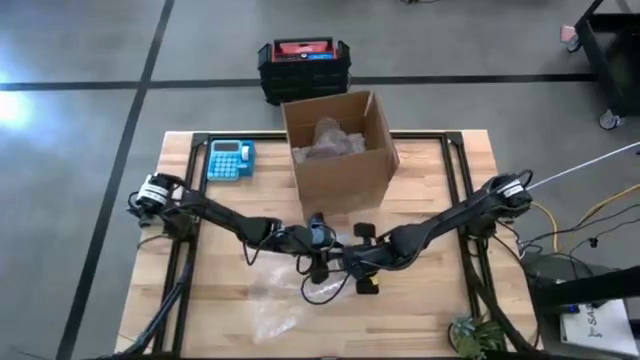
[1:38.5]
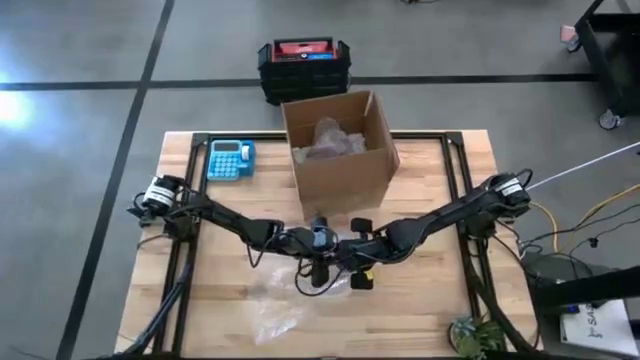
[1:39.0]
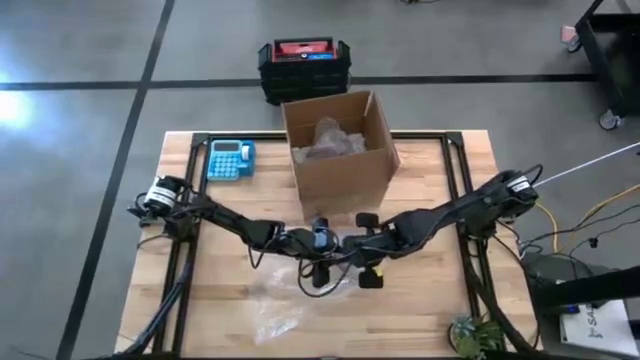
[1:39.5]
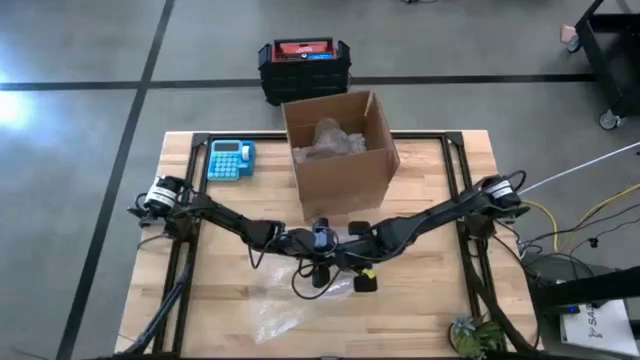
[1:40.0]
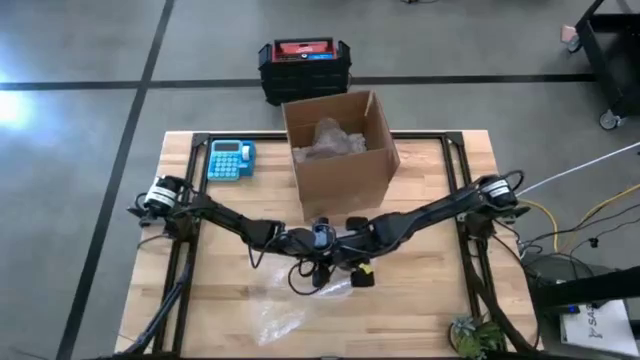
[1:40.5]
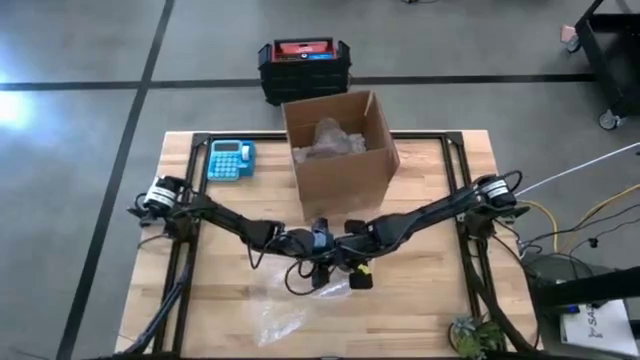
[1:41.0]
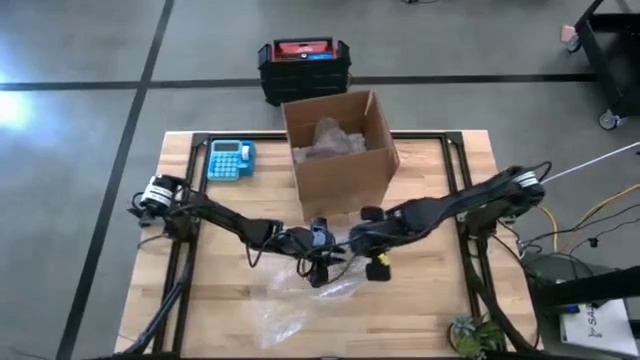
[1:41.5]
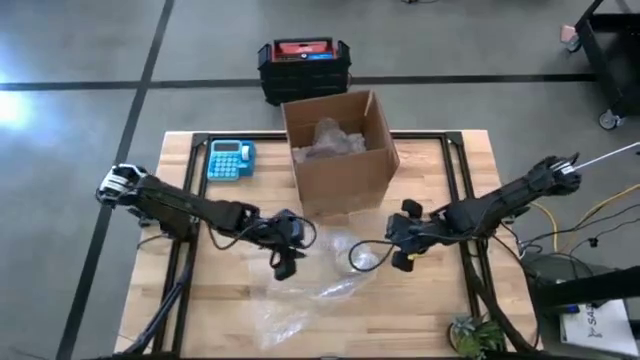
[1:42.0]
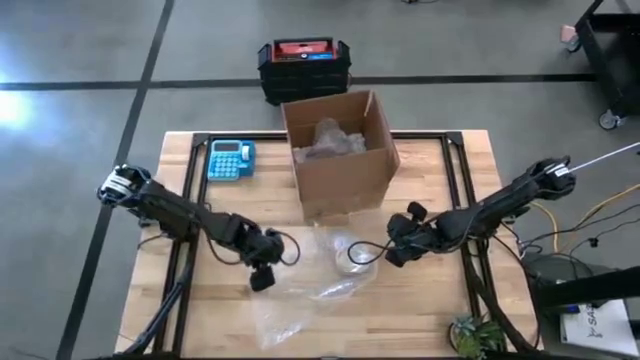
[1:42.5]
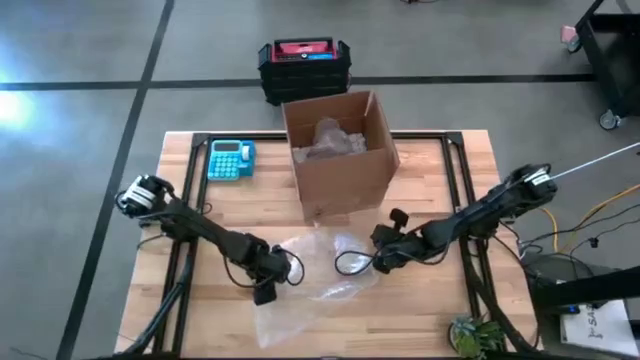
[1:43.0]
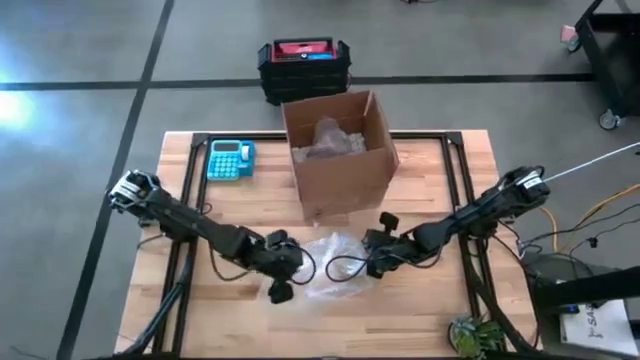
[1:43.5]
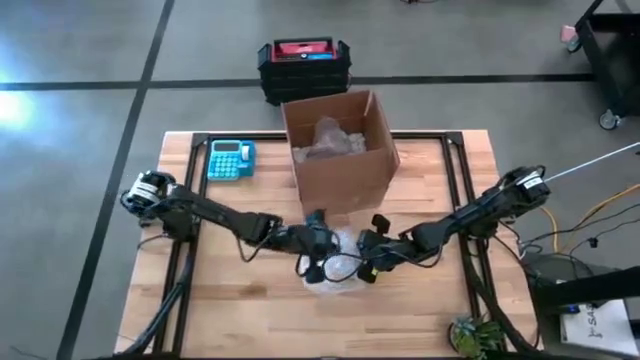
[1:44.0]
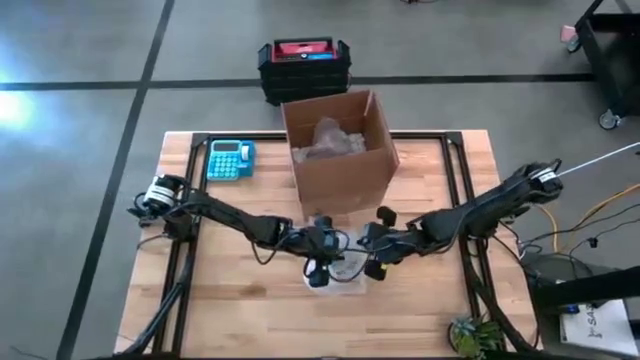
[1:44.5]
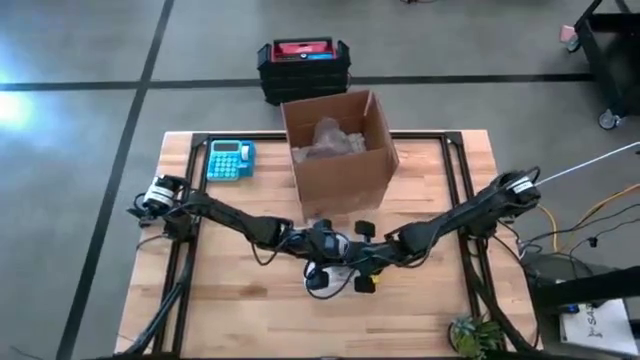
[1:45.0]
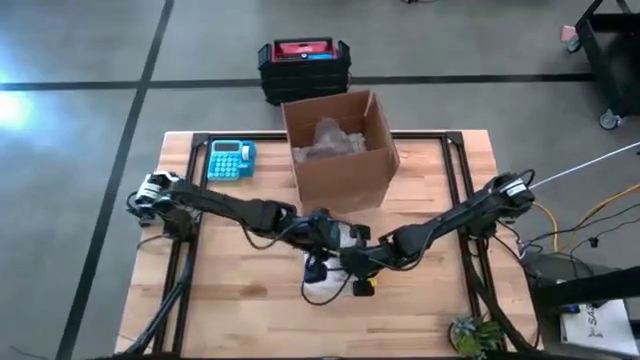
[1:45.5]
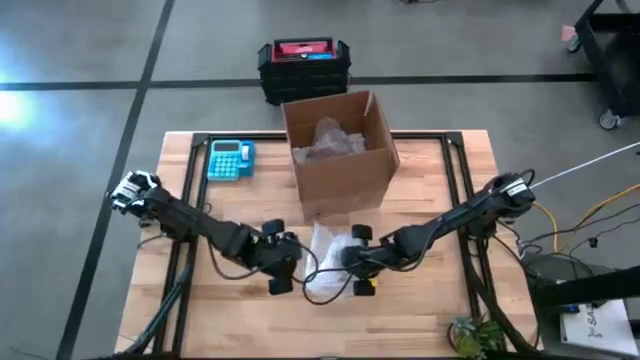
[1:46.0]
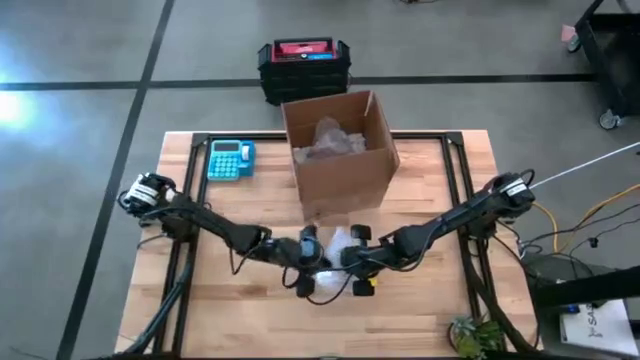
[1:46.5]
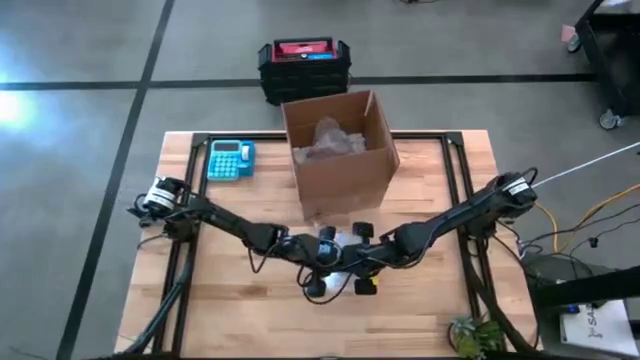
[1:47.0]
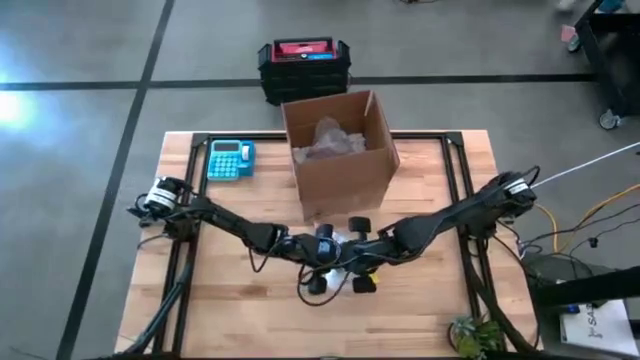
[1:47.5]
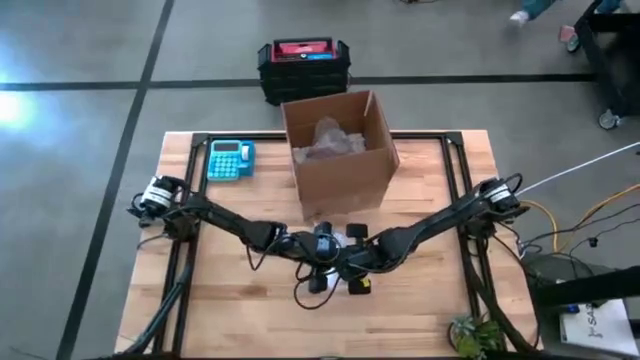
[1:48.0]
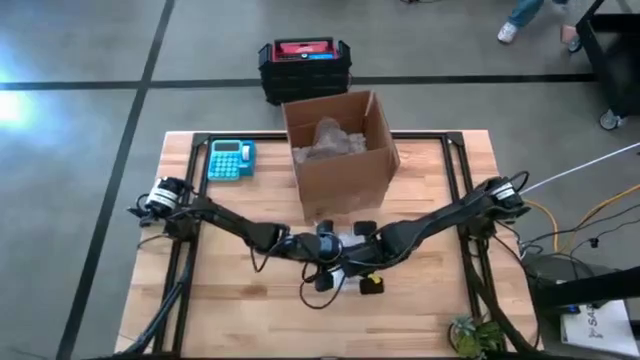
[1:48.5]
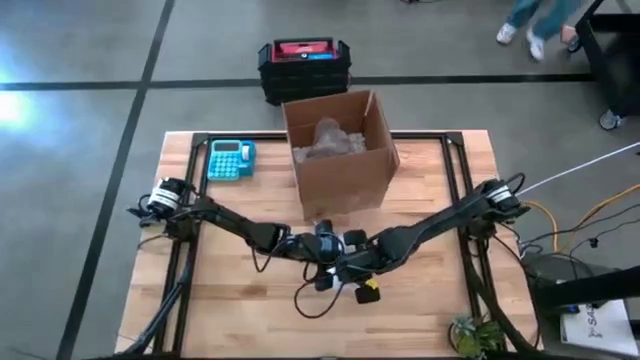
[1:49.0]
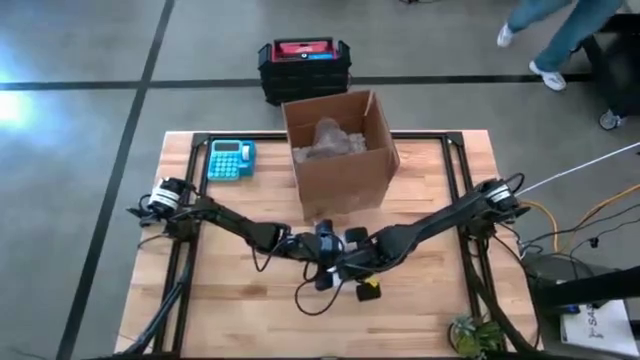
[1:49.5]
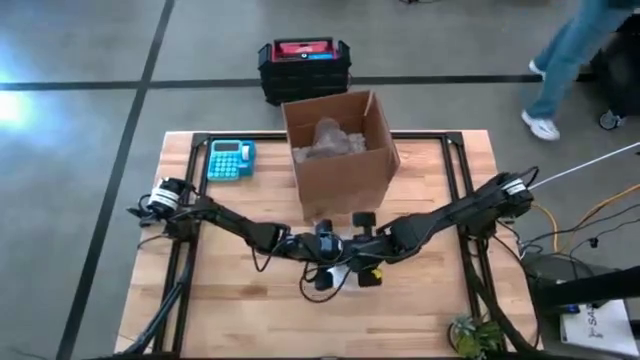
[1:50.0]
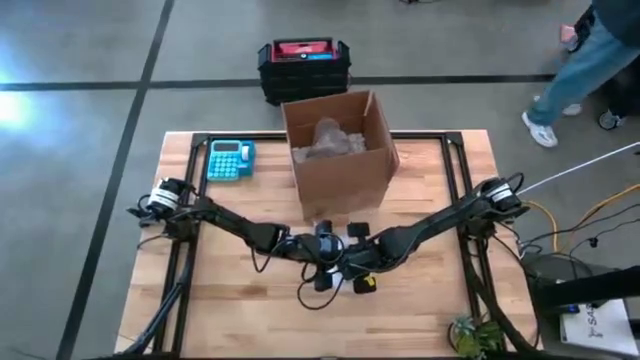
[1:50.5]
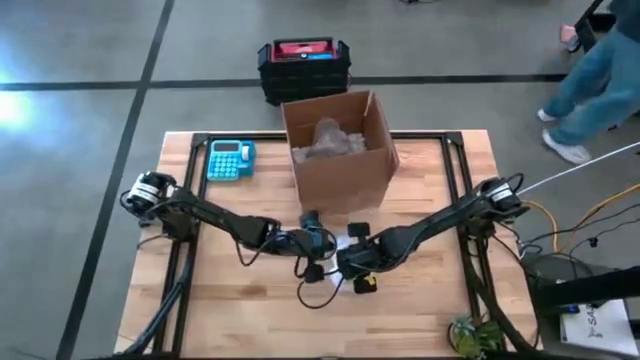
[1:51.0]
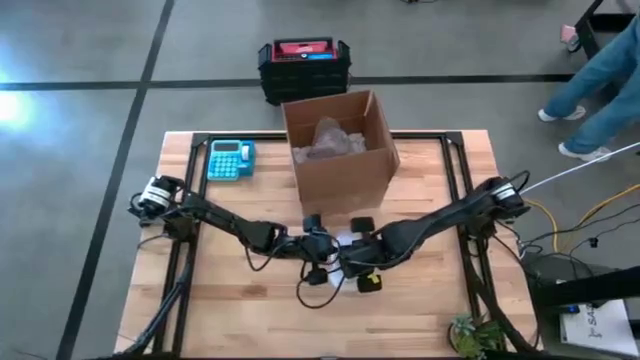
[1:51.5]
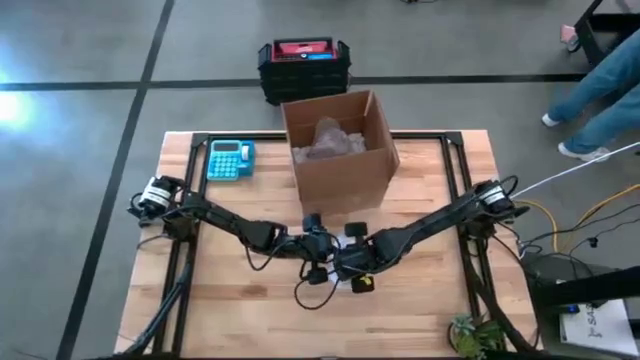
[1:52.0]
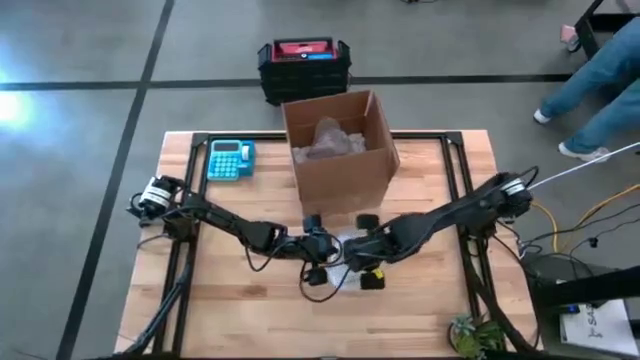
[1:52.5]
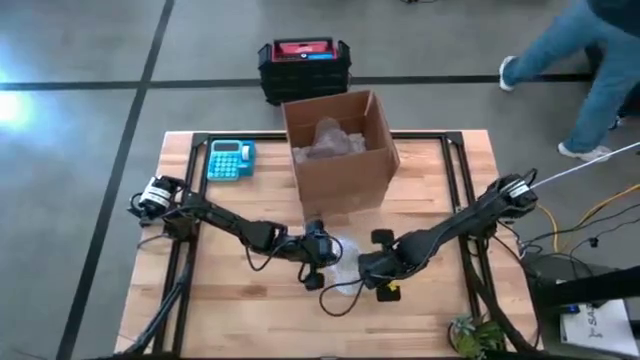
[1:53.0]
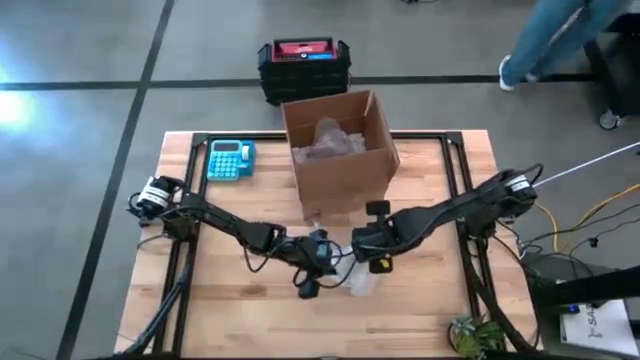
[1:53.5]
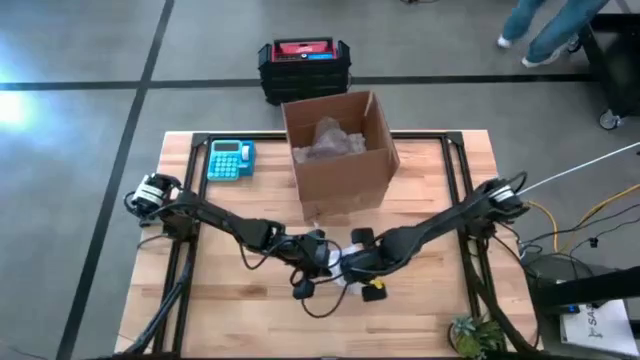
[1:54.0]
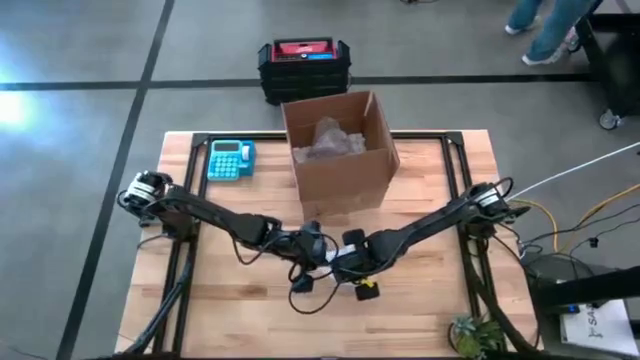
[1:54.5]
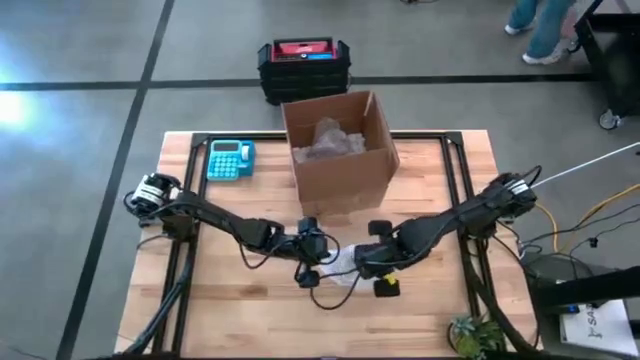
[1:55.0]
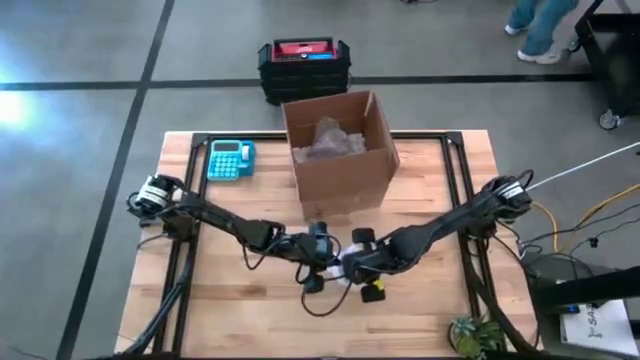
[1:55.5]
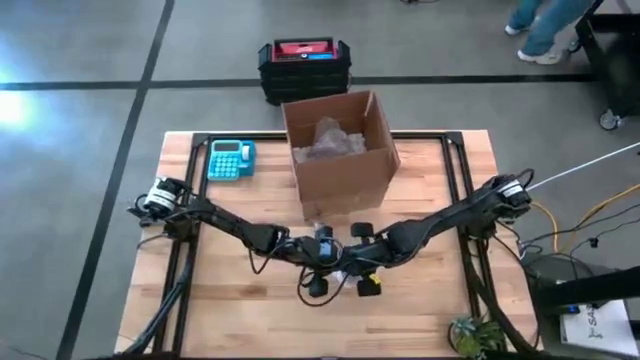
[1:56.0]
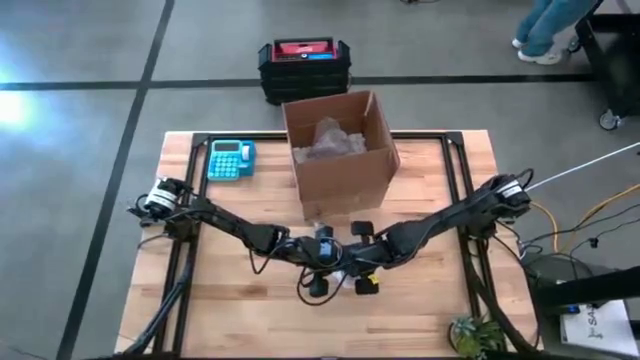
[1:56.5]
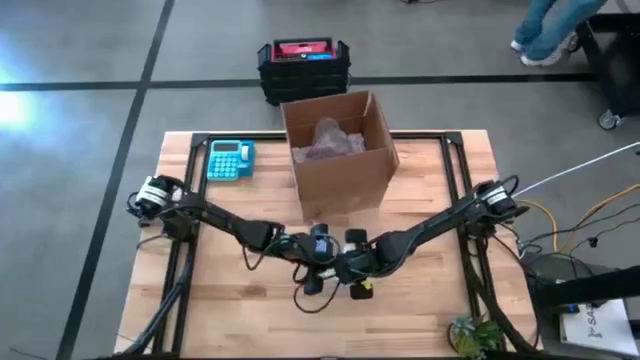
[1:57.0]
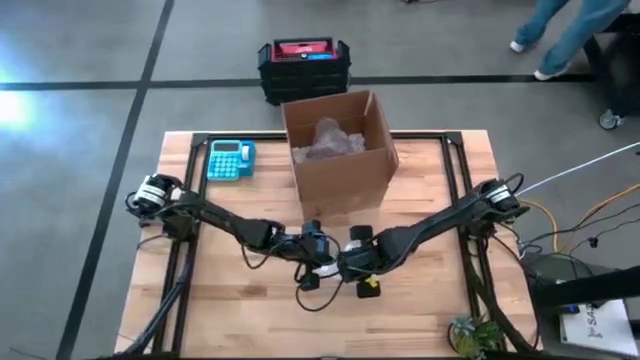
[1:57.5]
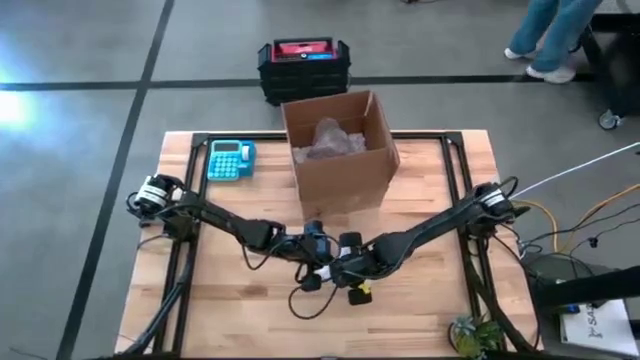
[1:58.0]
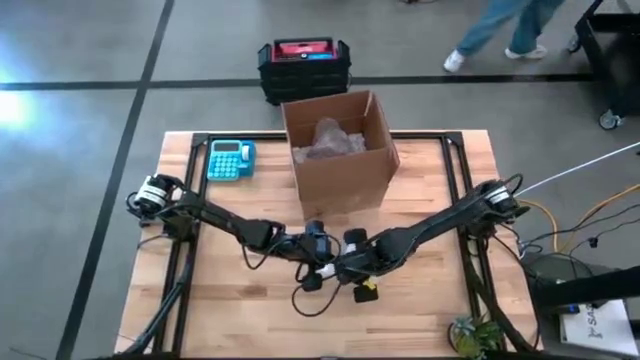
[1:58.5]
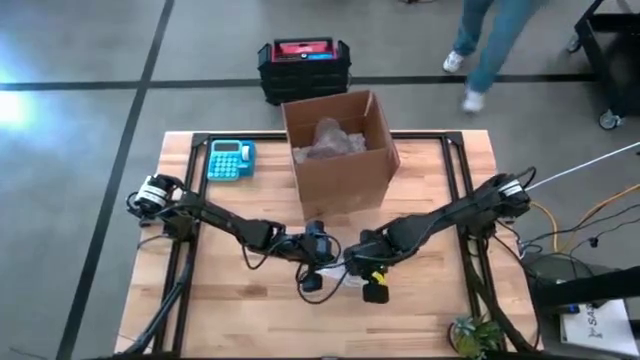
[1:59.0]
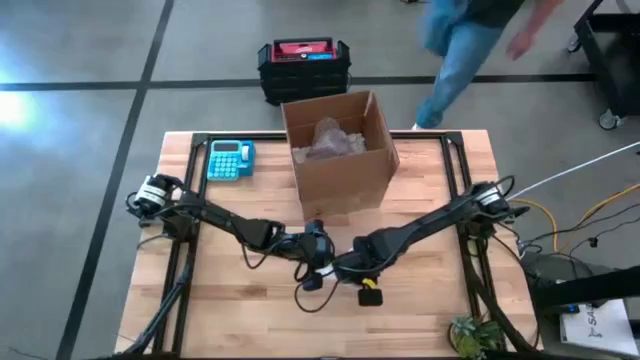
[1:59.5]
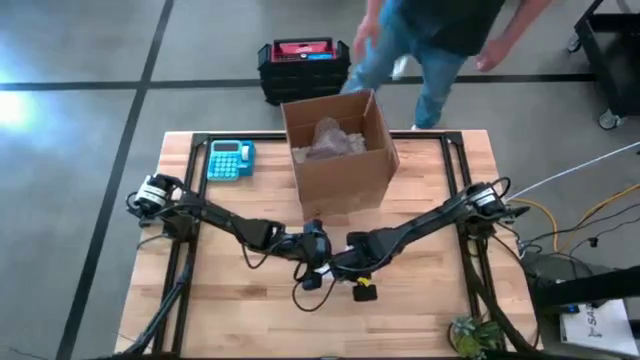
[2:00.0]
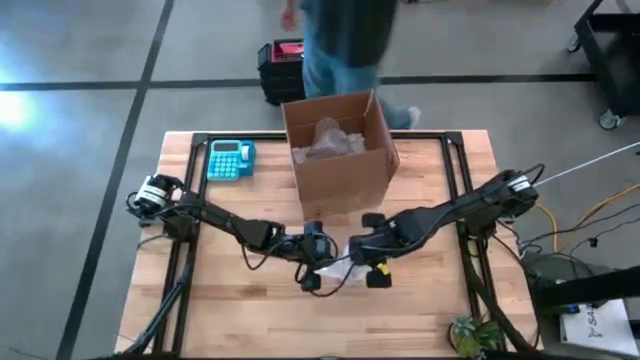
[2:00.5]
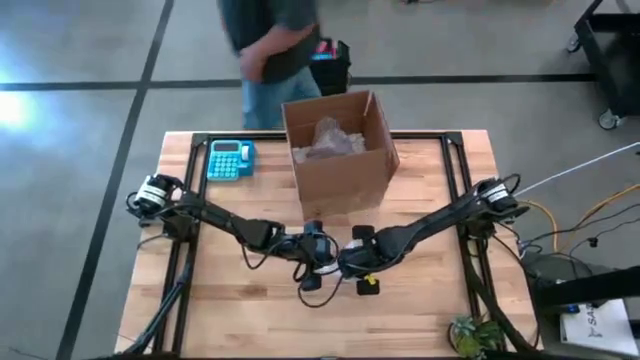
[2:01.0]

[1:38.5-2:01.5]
Task: wrap mug
Wrap the gray mug with bubble wrap
